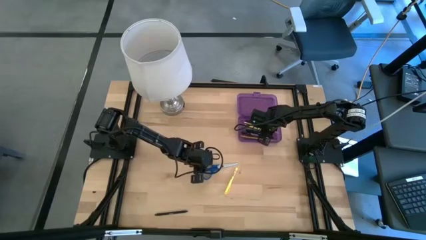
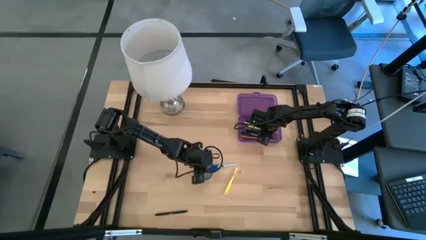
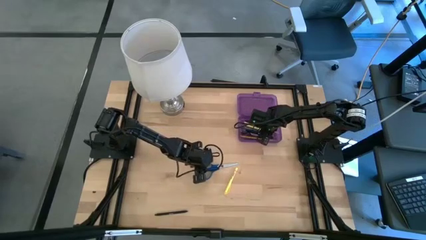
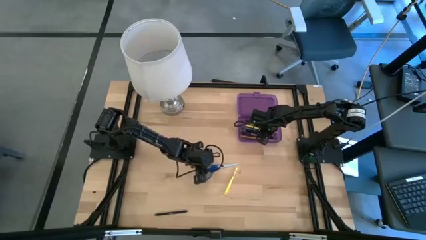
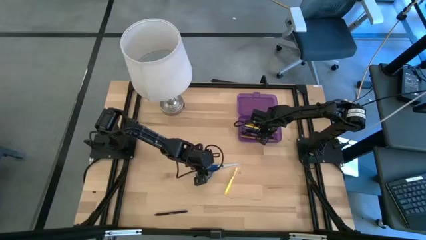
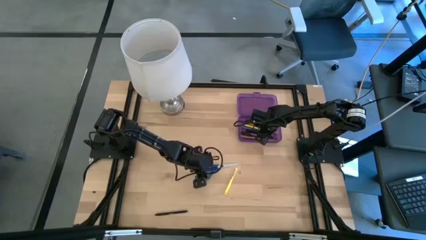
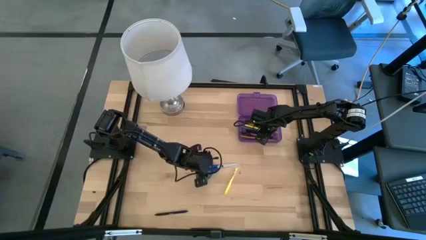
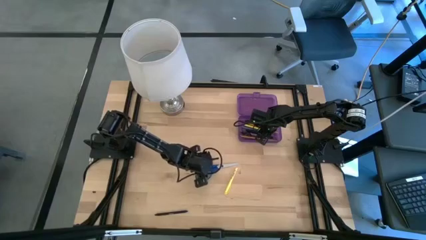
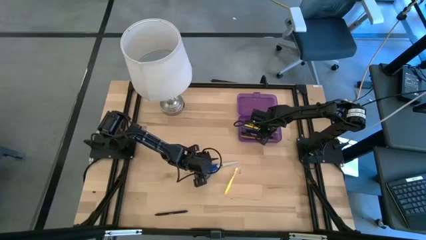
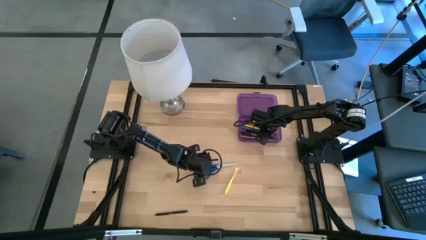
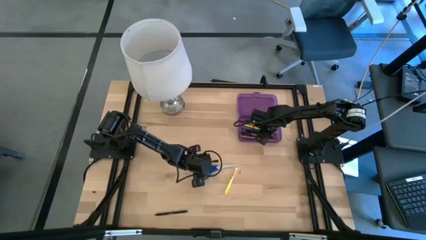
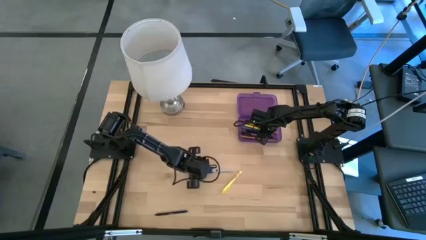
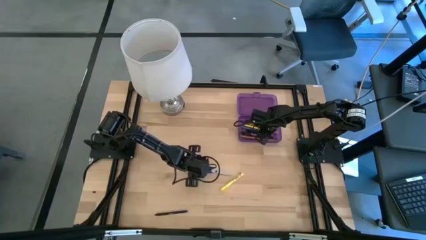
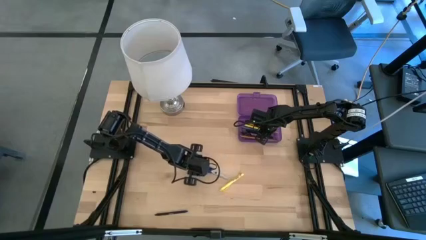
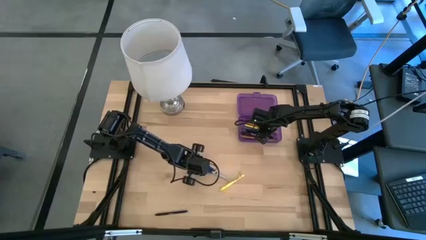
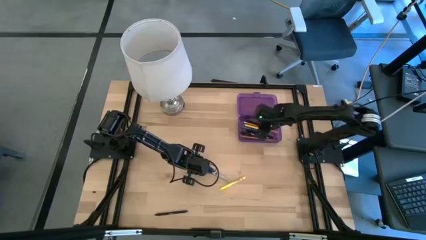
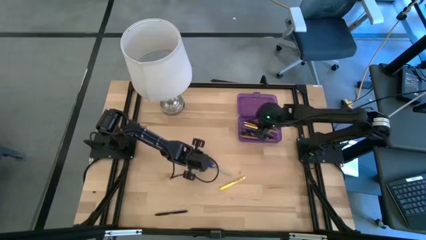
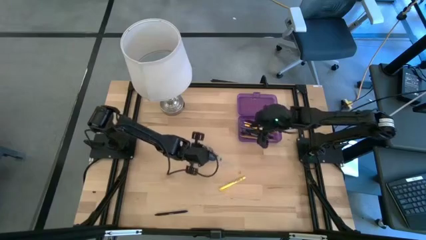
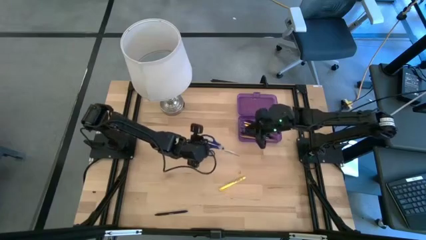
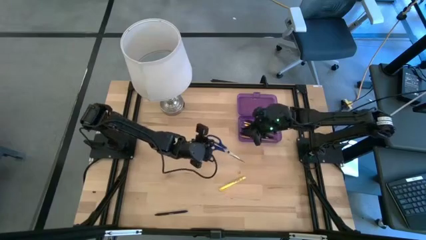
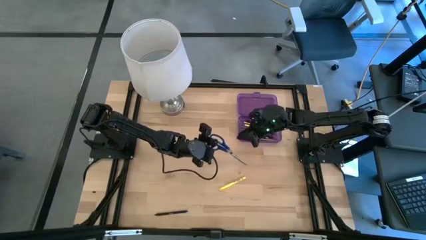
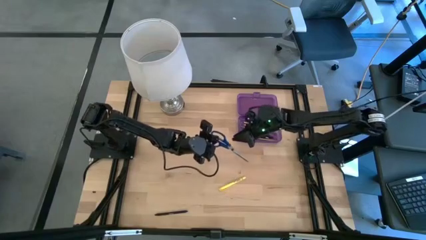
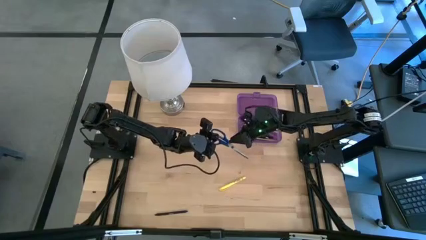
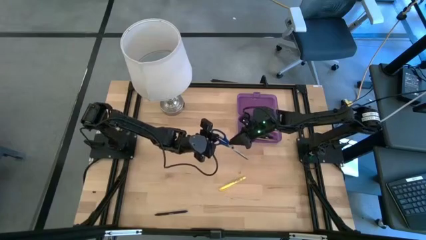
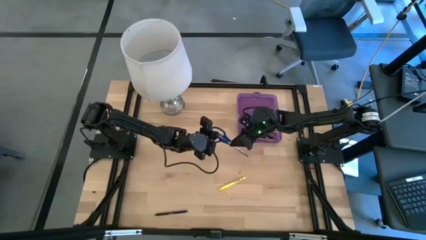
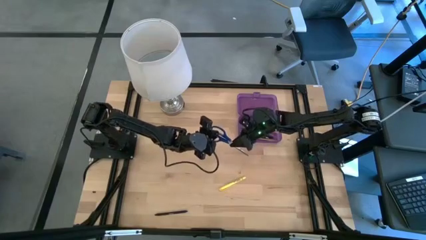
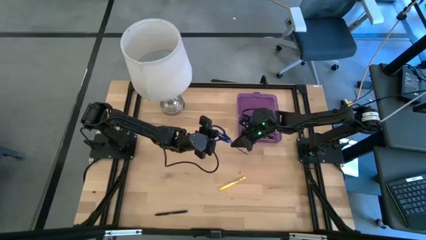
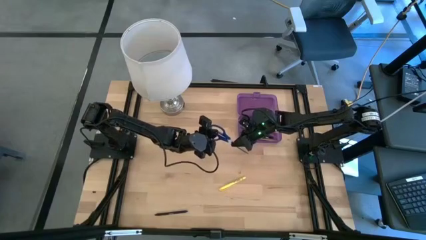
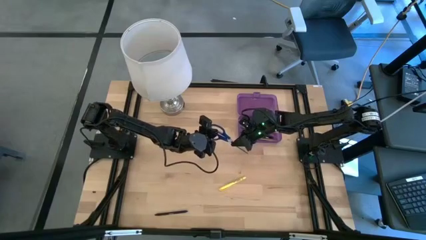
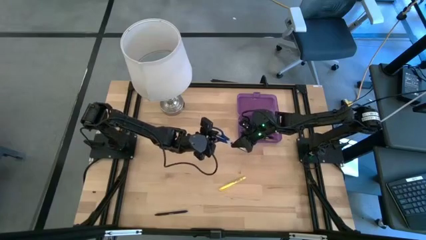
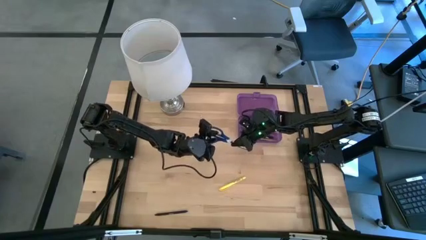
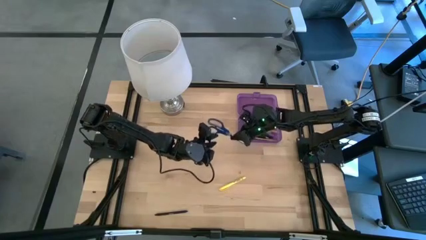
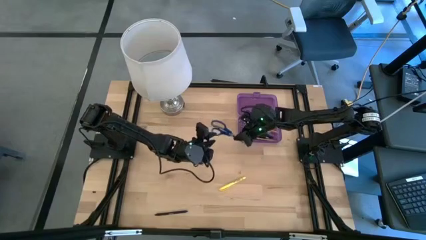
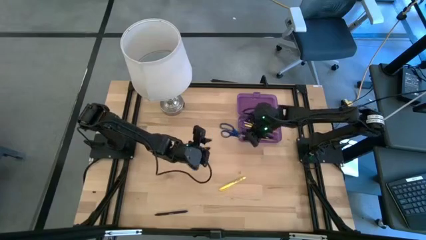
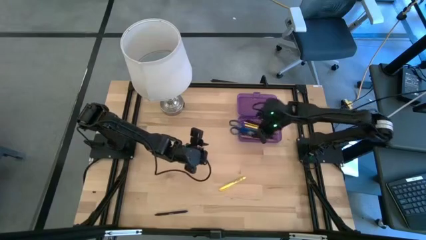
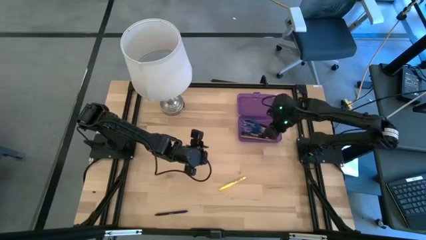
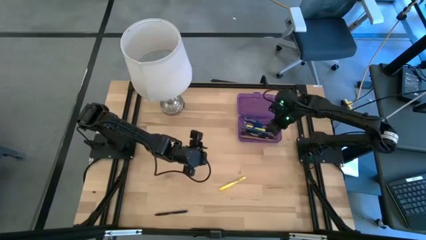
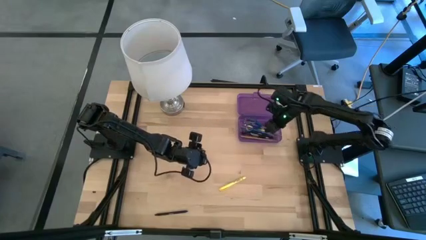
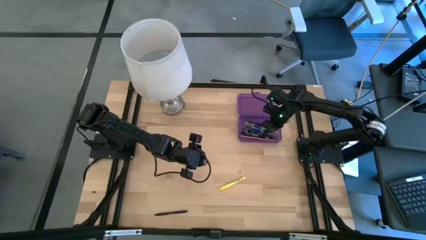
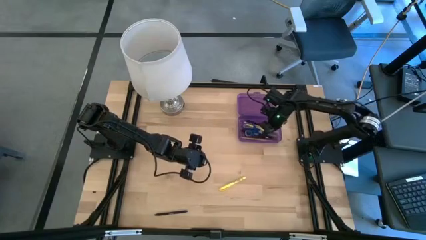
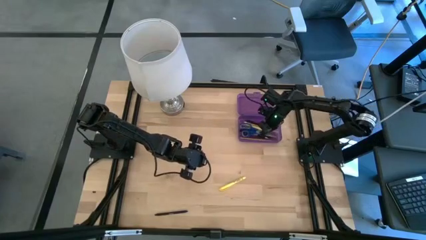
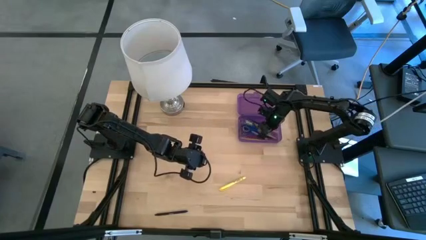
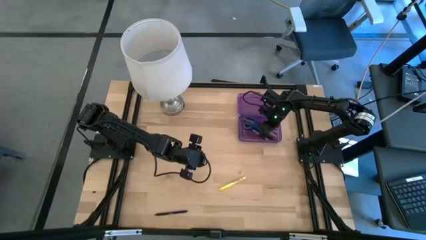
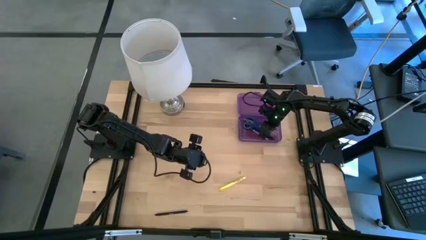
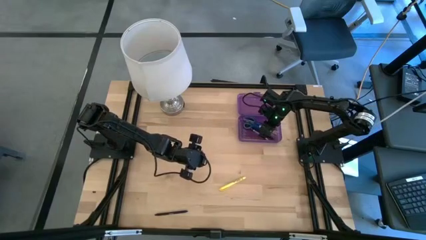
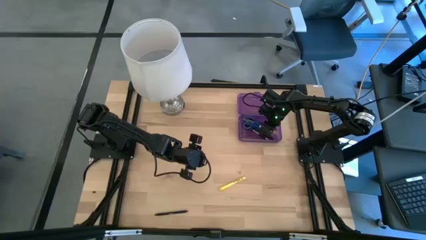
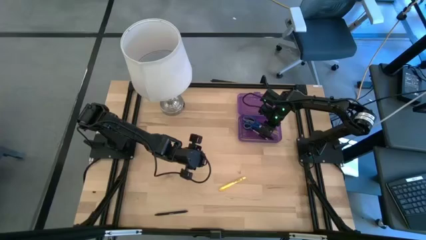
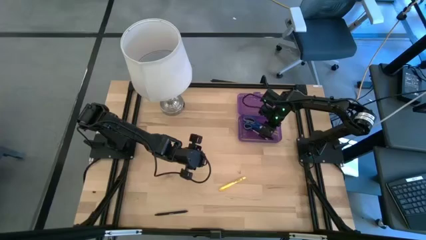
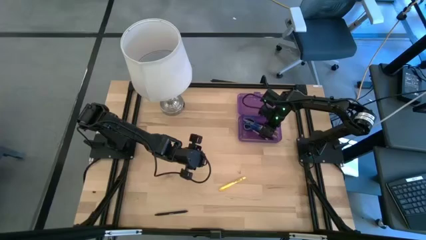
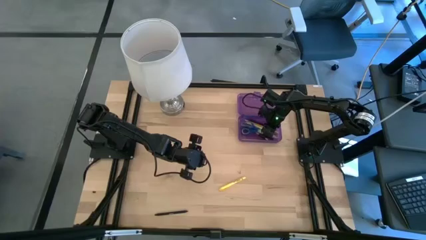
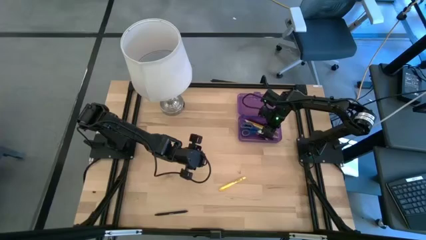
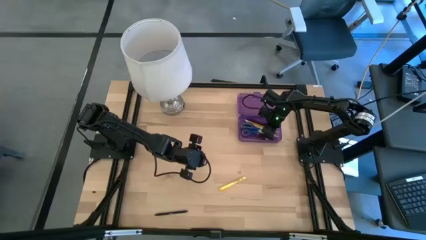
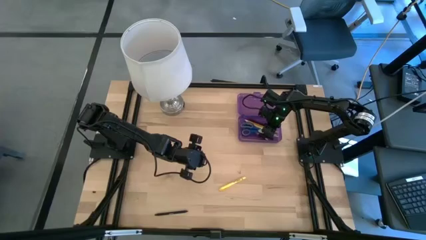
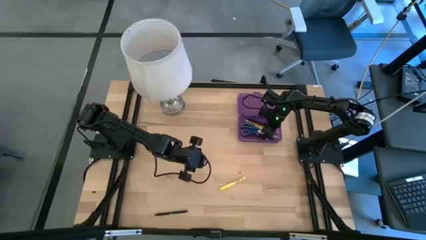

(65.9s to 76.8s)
Task: Pick & place school supplies into a supply box
Put the blue scissors into the purple supply box

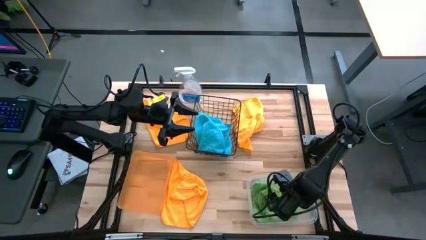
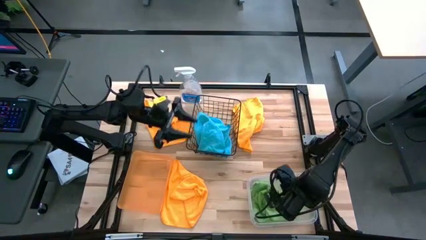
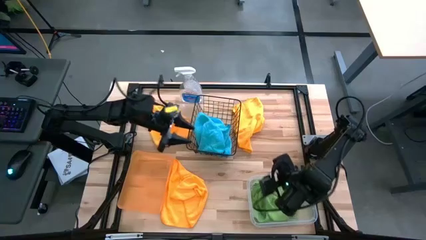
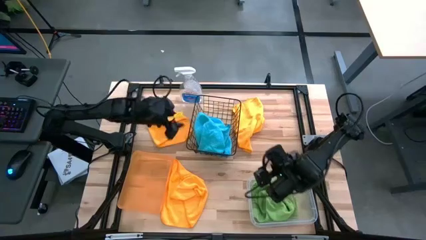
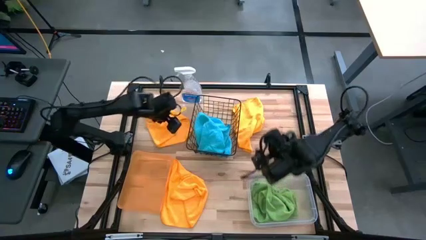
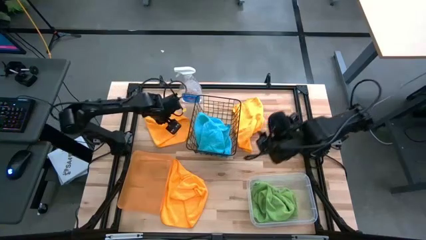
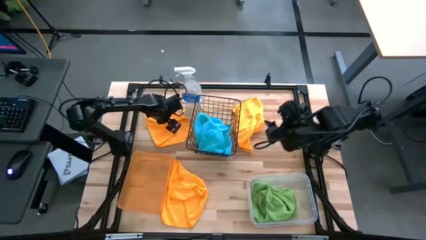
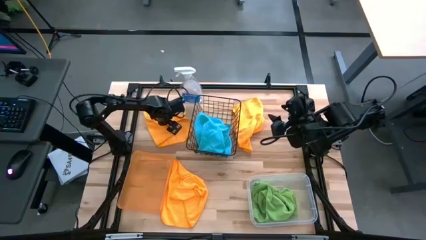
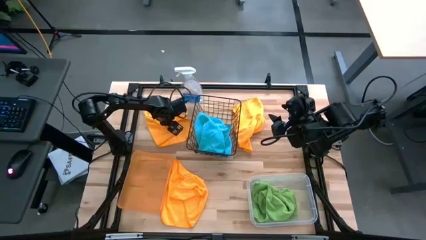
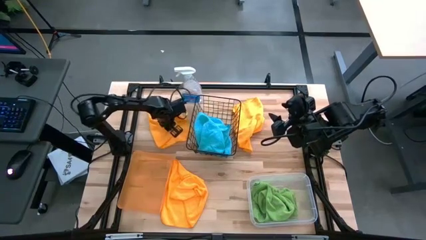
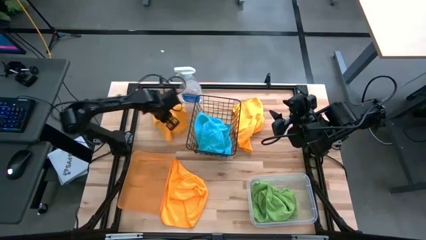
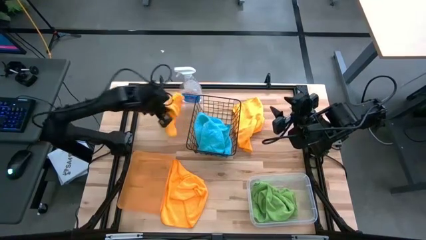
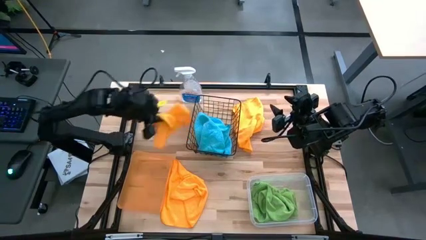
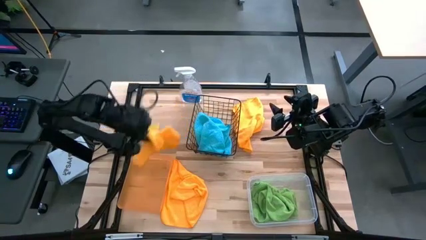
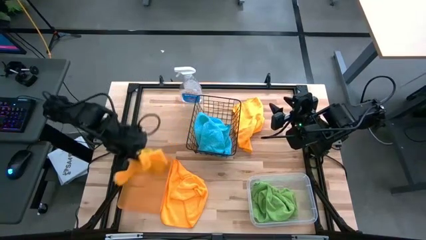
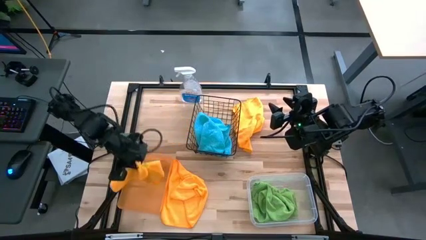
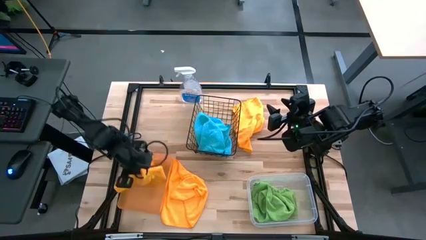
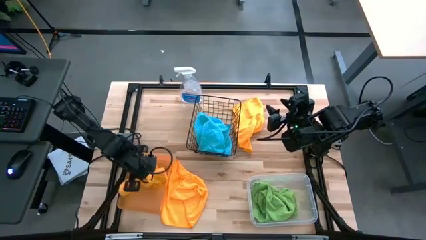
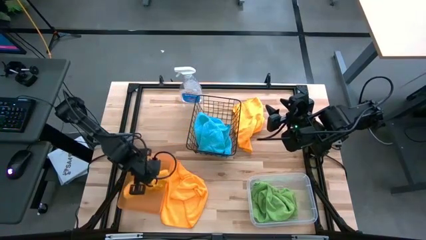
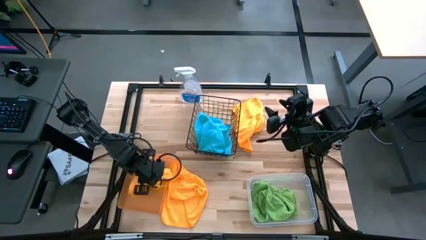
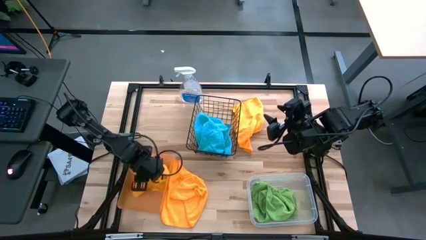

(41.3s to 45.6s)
Task: Sort microfiber towel by color & place in baskets
Put the top left orange microfiber towel into the orange bin
